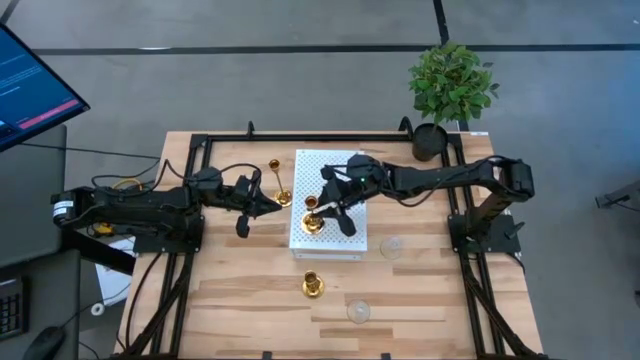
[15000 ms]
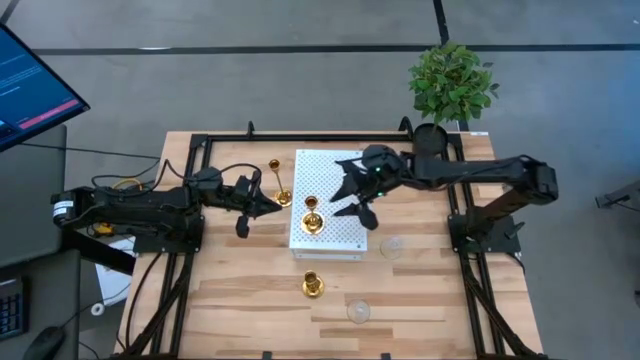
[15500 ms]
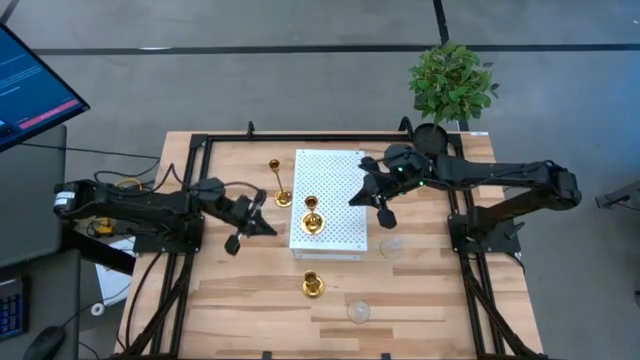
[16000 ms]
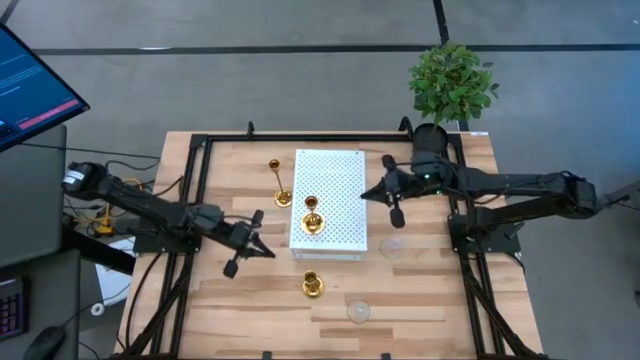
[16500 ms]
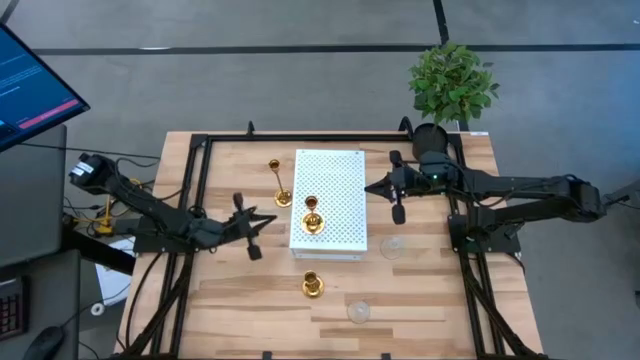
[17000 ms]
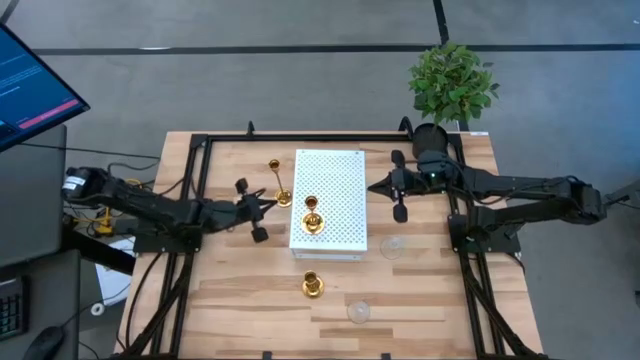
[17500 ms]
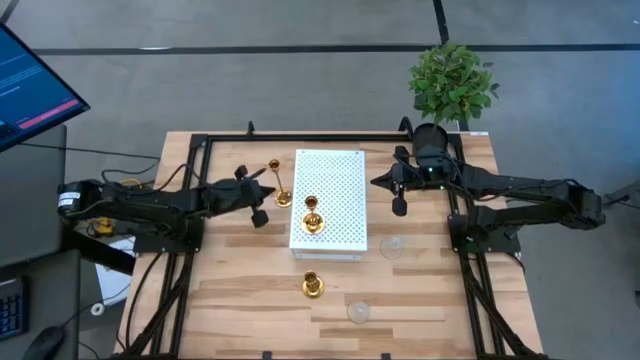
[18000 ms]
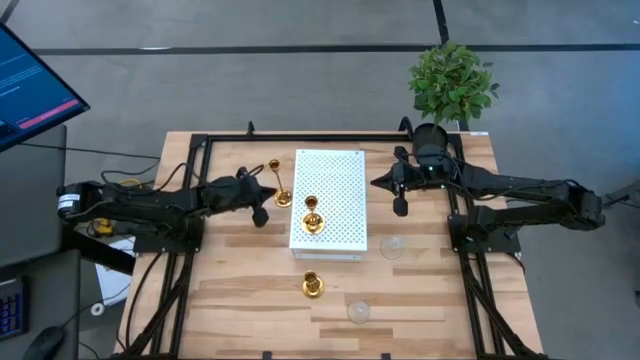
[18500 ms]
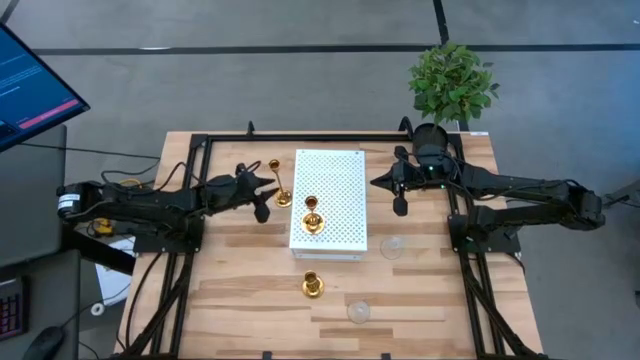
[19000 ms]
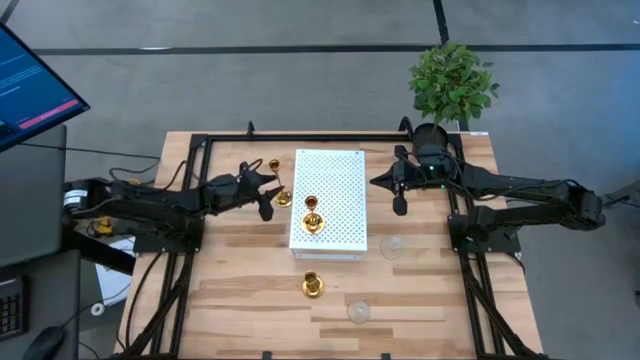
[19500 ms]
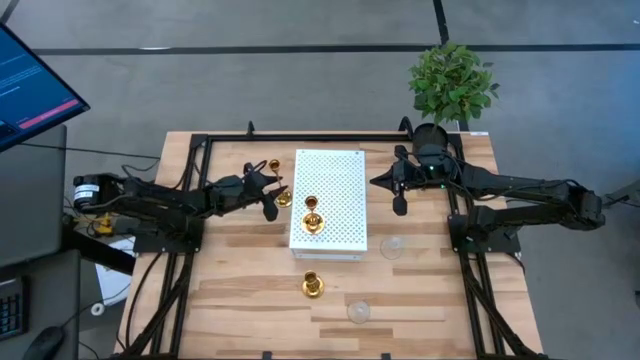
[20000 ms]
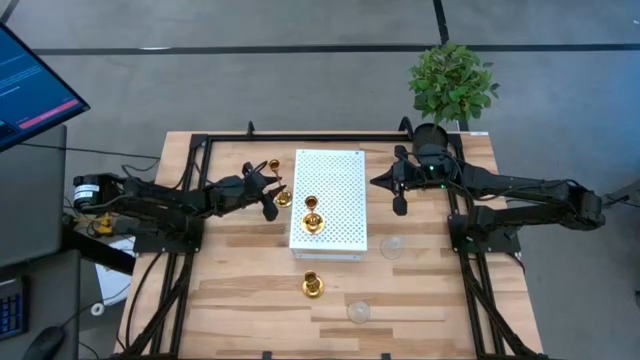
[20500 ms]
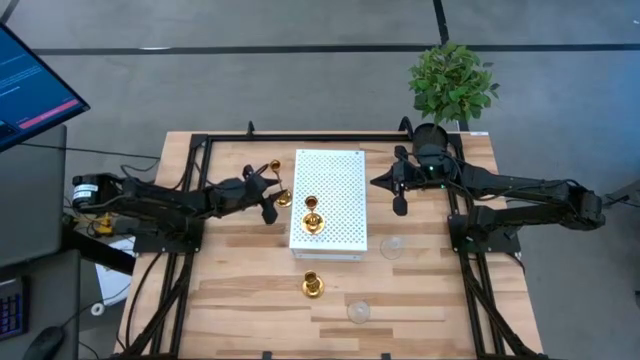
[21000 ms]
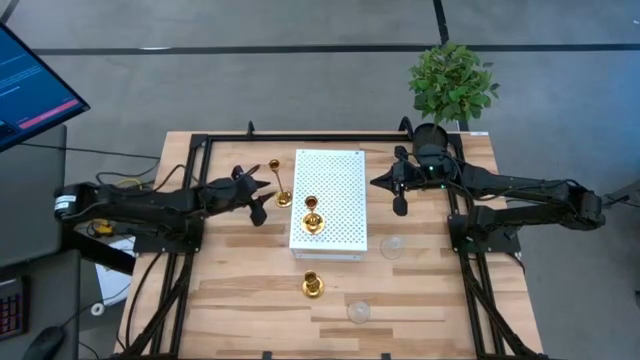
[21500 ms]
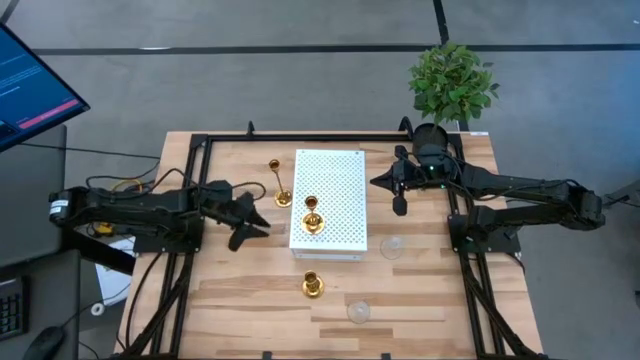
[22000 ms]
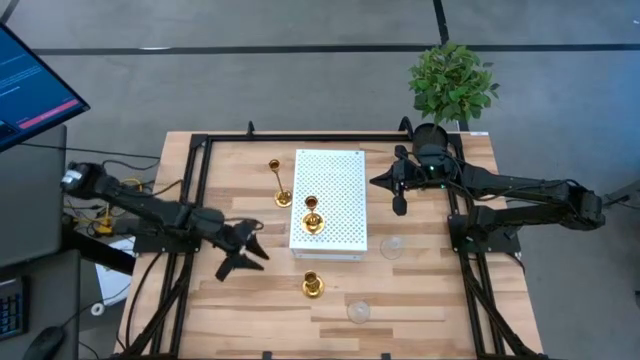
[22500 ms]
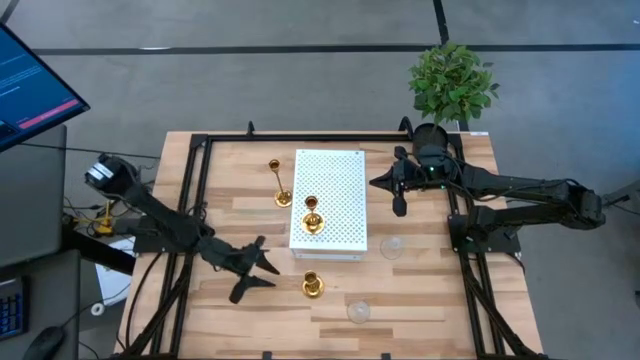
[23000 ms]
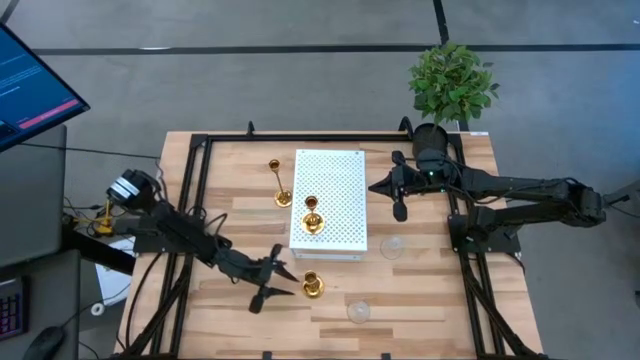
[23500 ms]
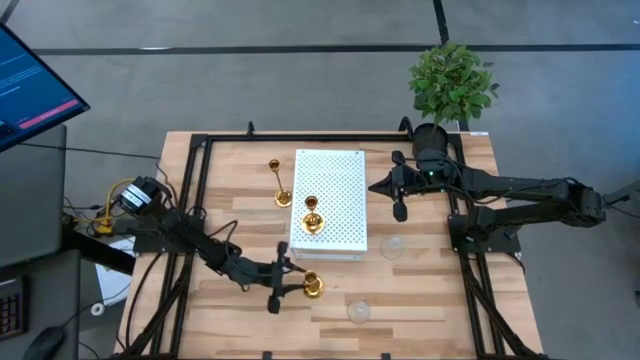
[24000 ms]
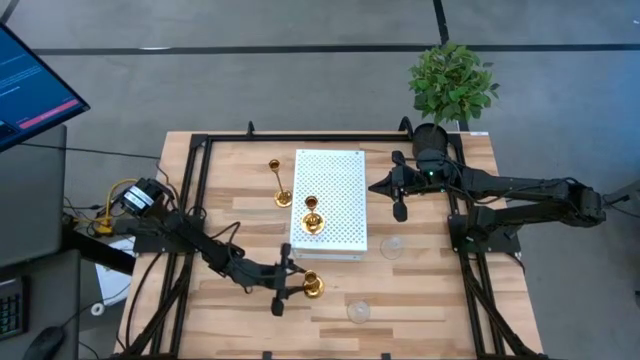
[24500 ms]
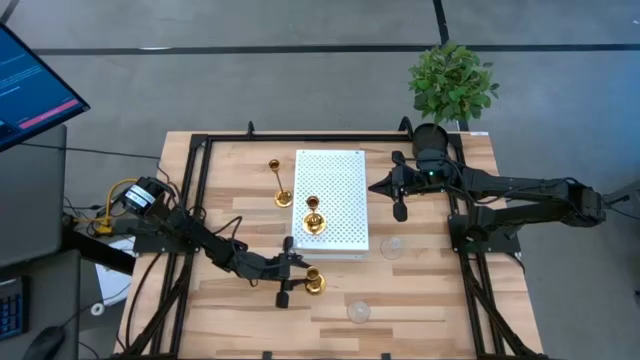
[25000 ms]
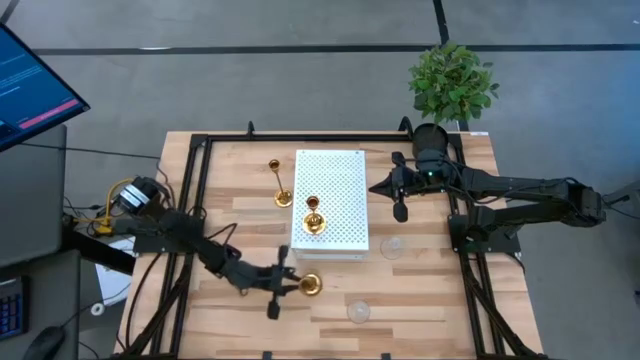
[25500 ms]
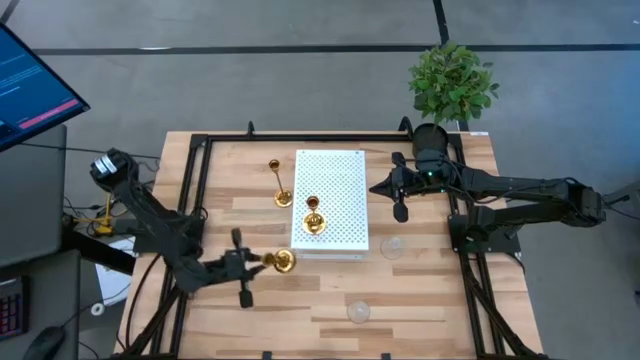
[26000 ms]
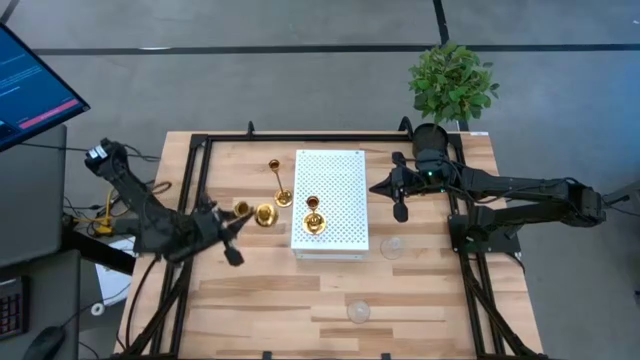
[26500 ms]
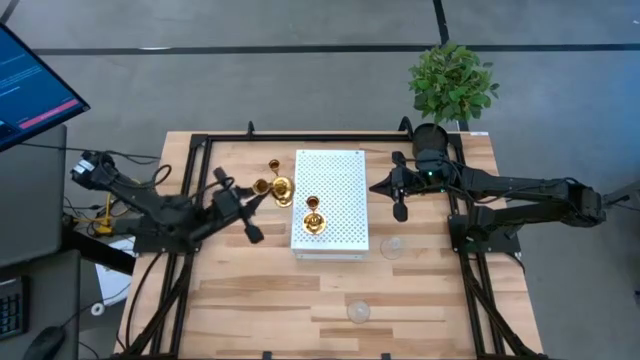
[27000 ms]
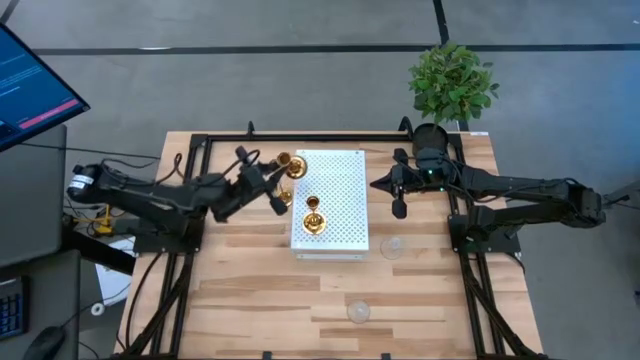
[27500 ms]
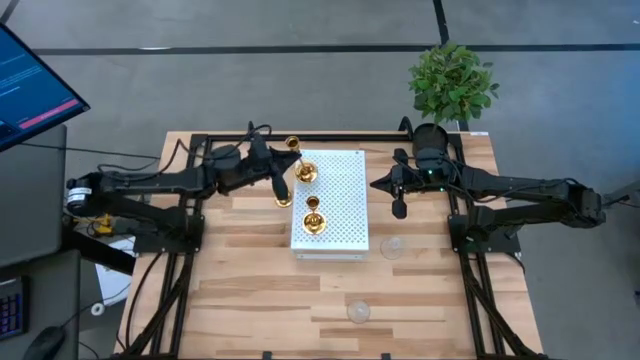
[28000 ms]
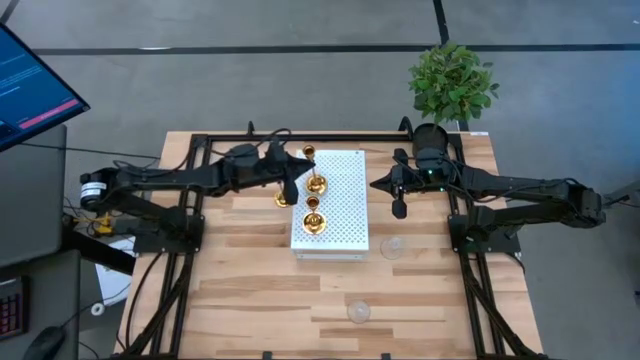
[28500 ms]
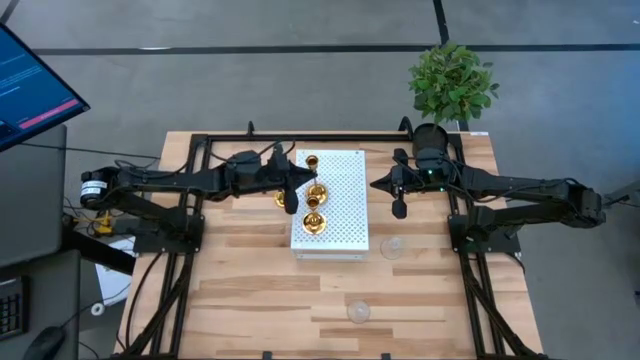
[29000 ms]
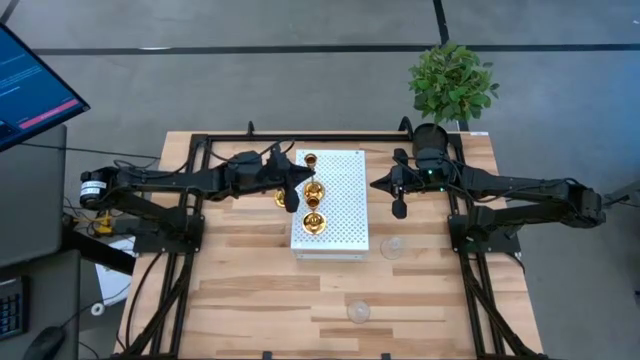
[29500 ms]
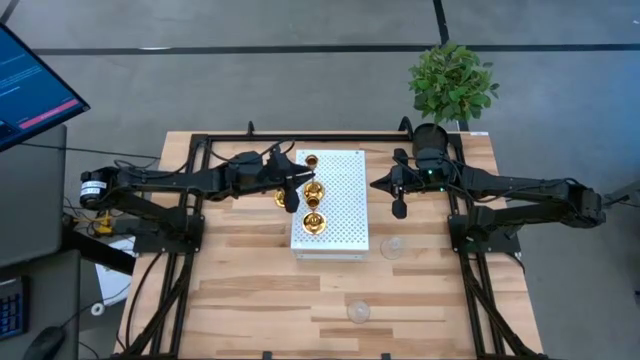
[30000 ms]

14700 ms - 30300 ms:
Task: Pick & Place candle stick holders
Put the bottom gold candle holder on the shelf aligned with the other gold candle holder

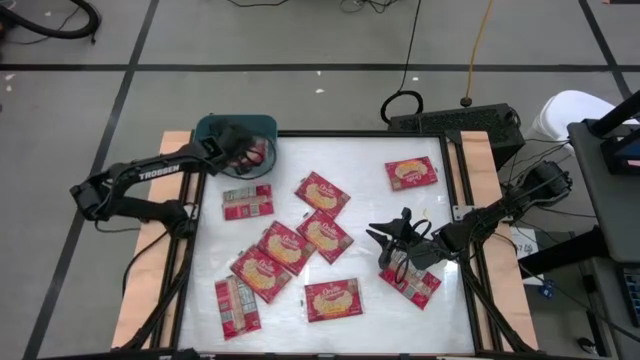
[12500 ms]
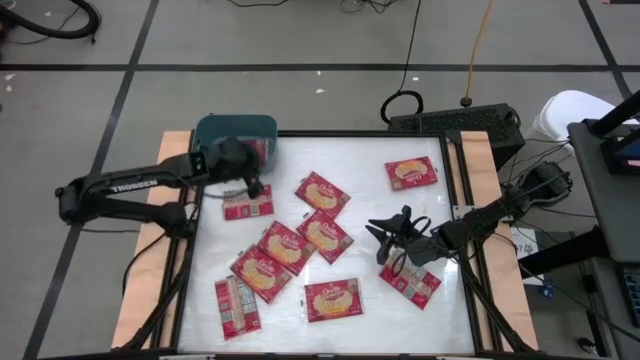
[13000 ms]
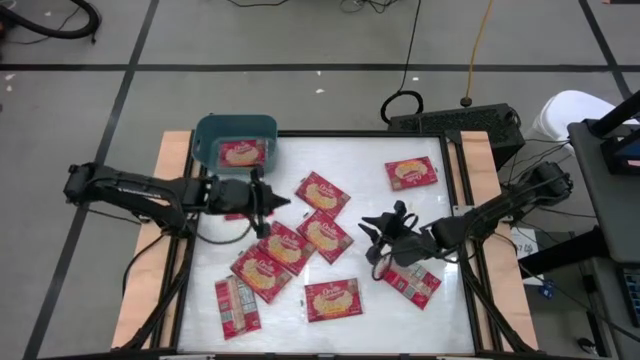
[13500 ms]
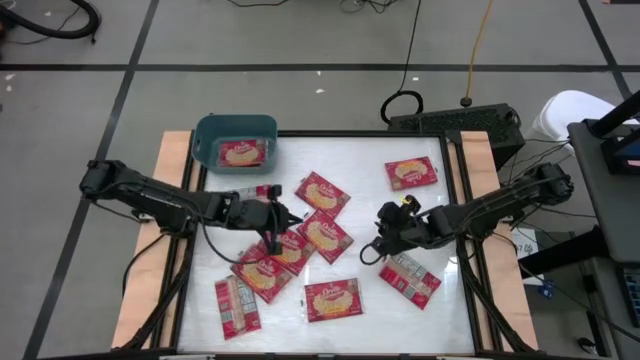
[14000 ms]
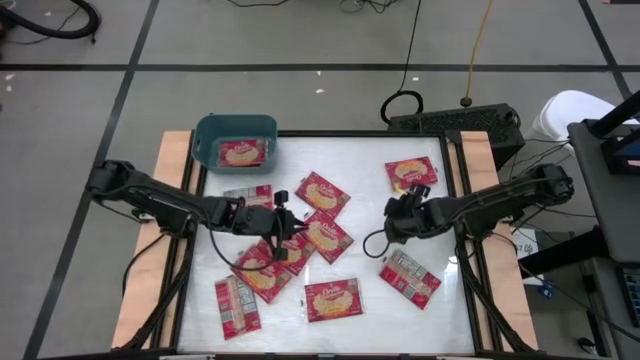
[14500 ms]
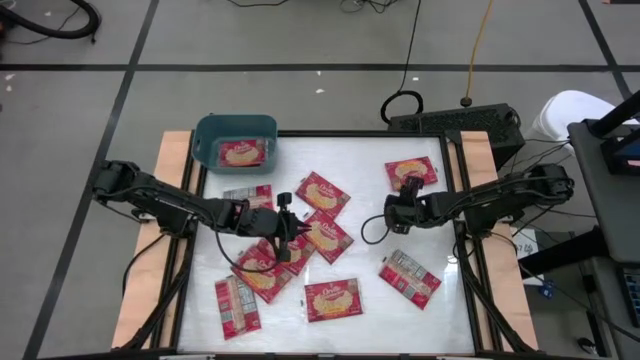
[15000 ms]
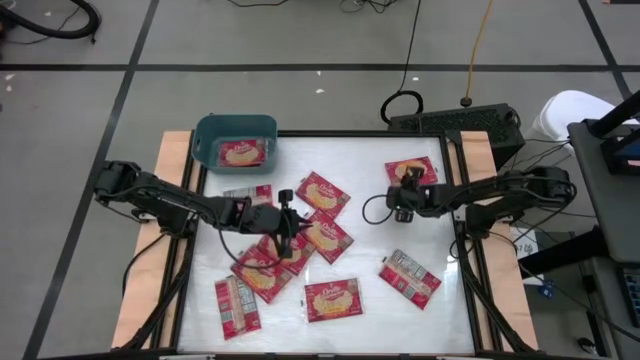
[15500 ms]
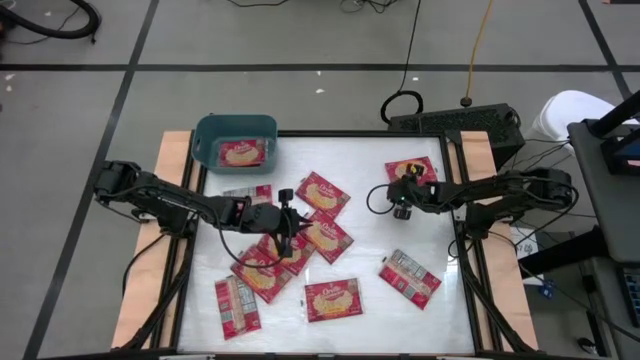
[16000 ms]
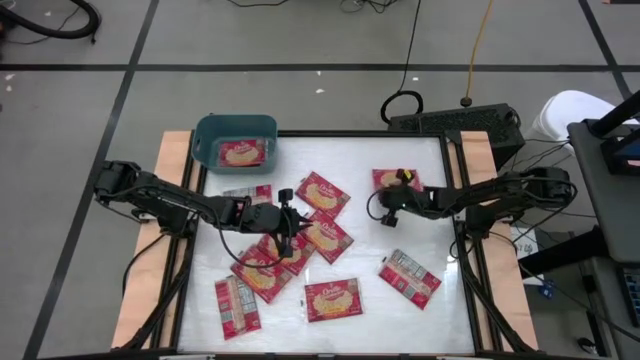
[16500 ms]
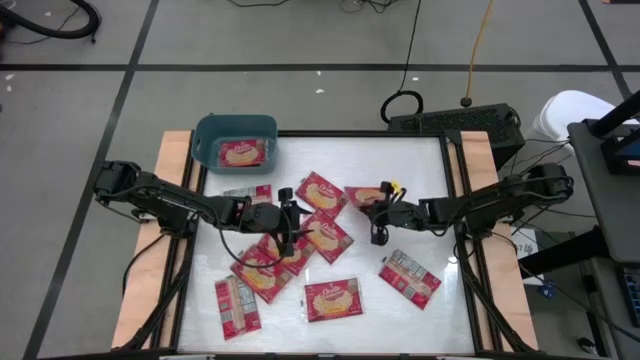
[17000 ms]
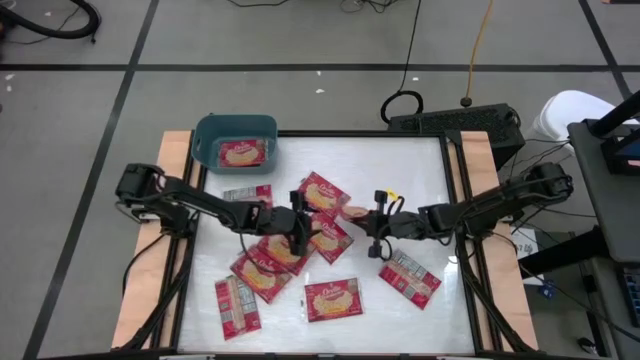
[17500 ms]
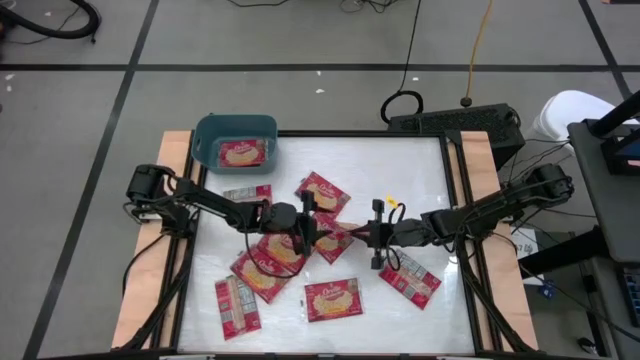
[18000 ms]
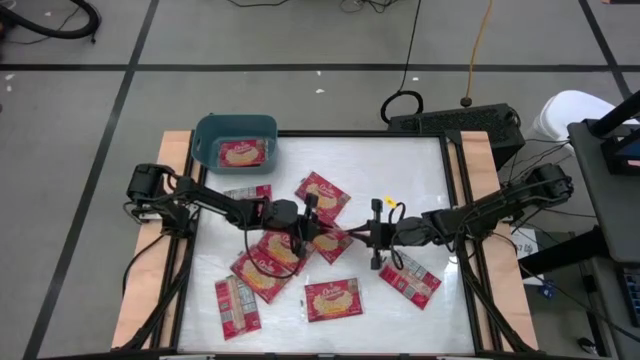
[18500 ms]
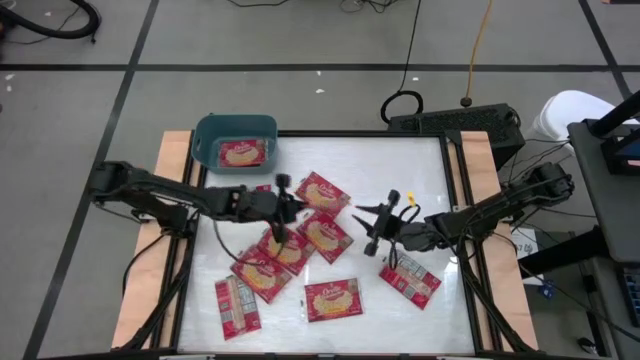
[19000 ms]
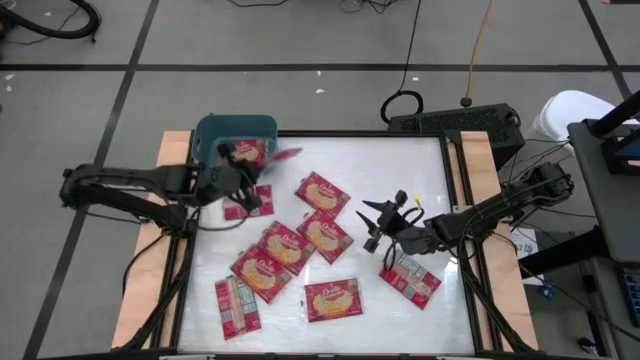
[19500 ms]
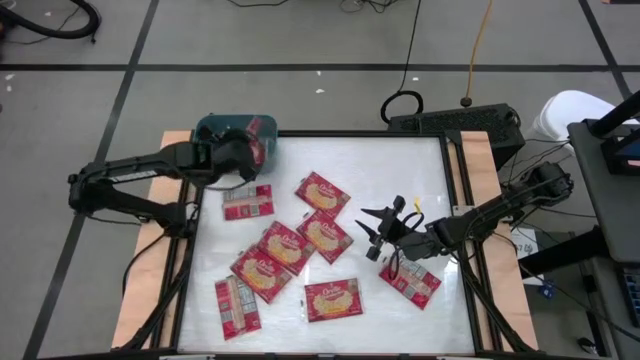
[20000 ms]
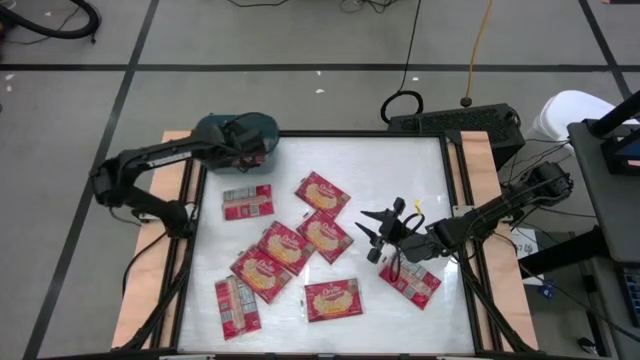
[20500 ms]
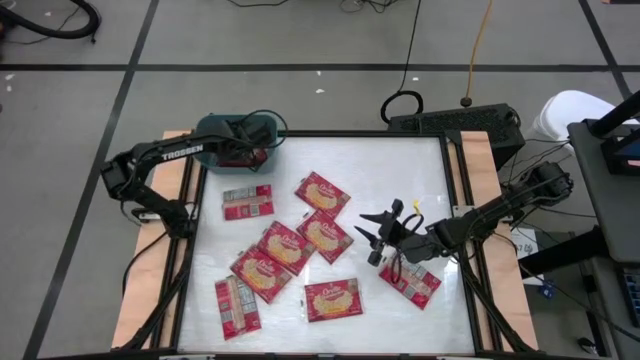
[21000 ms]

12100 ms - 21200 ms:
Task: Sort popcorn bags into baskets
Put the red popcorn bag into the blue bin
